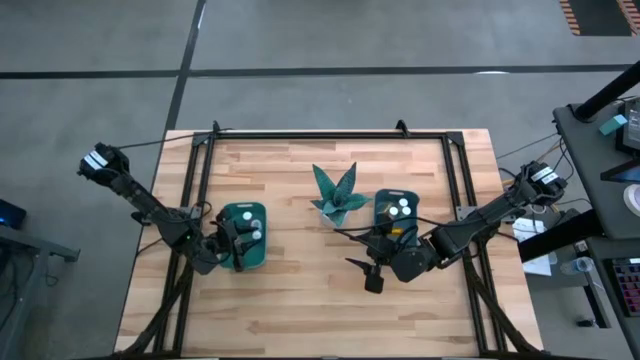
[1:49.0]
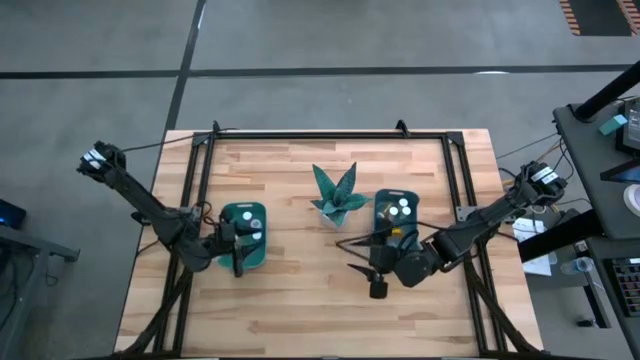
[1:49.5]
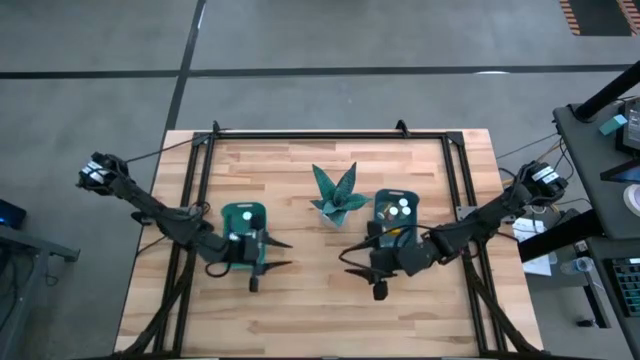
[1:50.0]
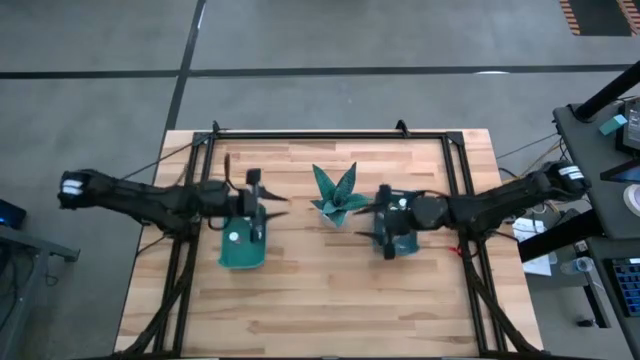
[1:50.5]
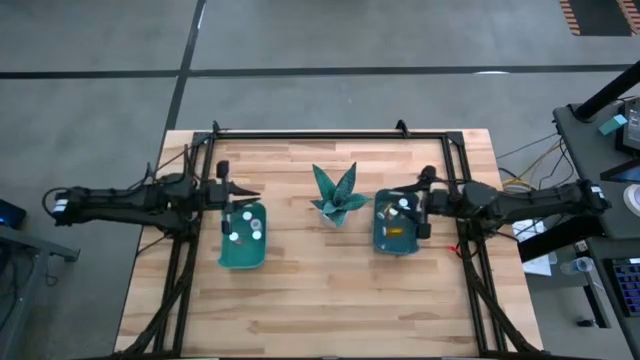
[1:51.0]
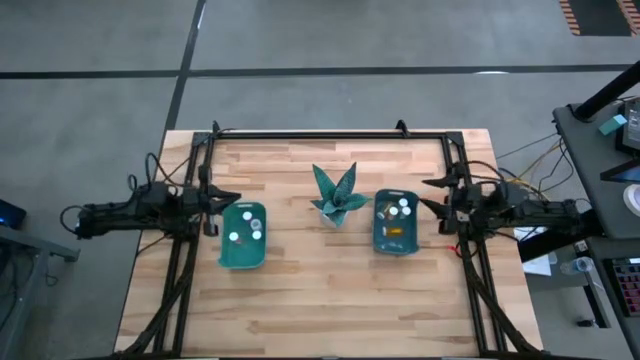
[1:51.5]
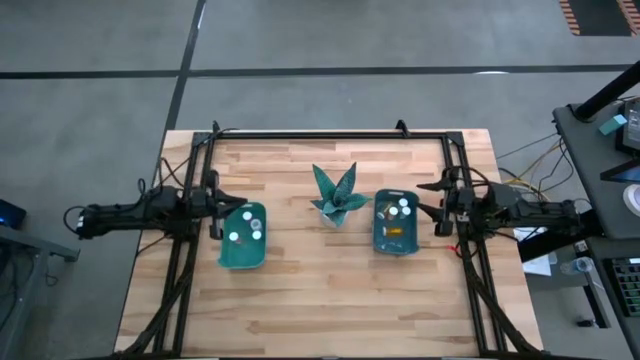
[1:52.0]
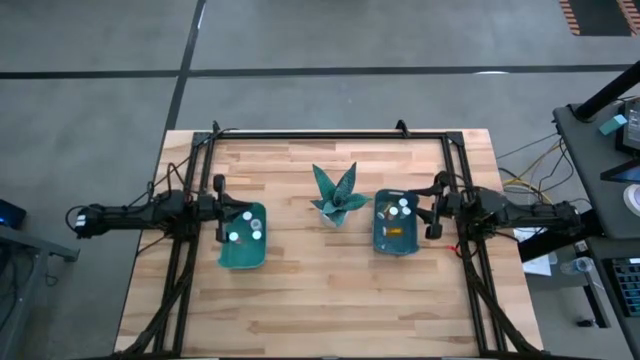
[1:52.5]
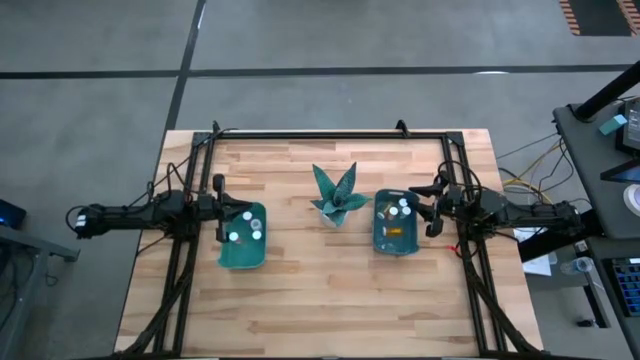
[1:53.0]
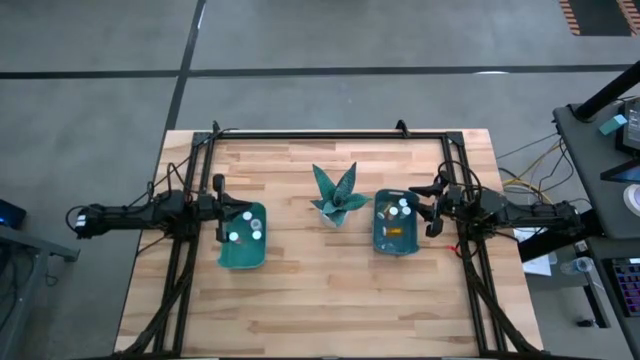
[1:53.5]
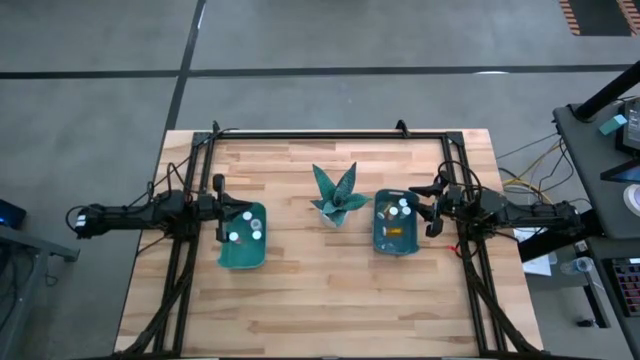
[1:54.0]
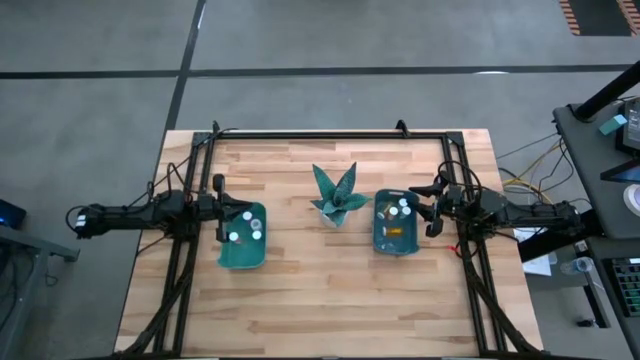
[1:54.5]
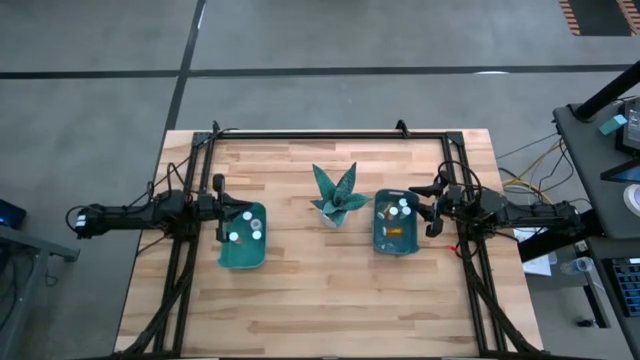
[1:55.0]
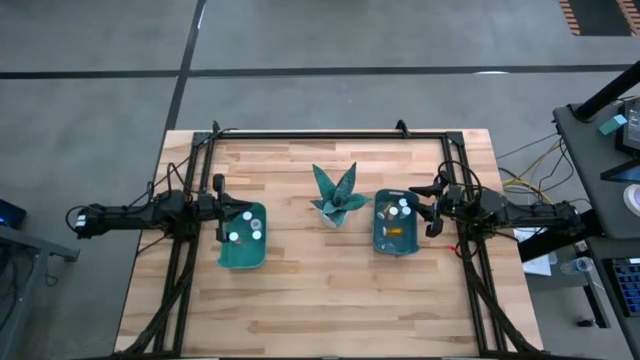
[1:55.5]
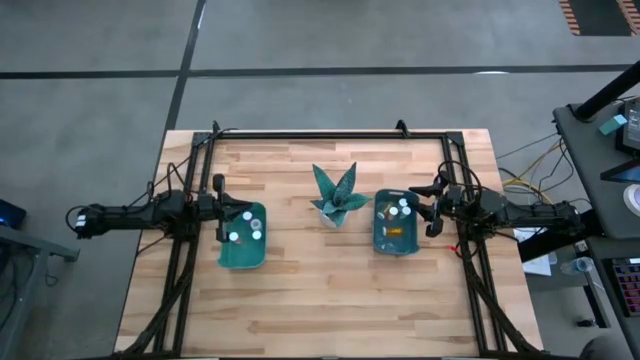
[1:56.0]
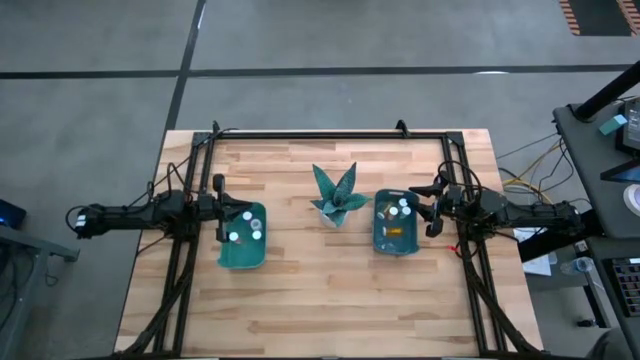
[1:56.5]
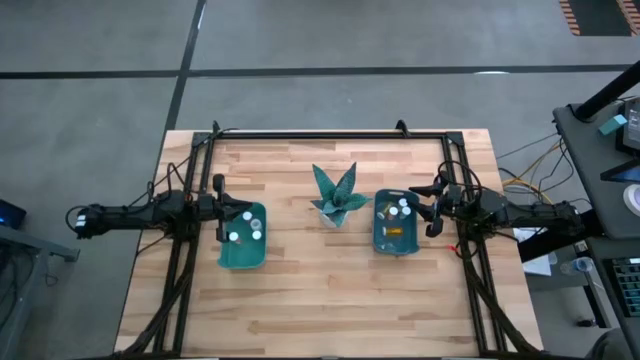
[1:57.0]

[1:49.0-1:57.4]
Task: Pick and place medicine bottles into bin by pill shape (circle, oval)
Return to Home Position

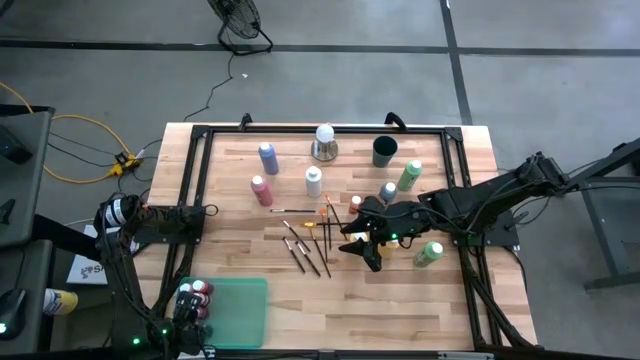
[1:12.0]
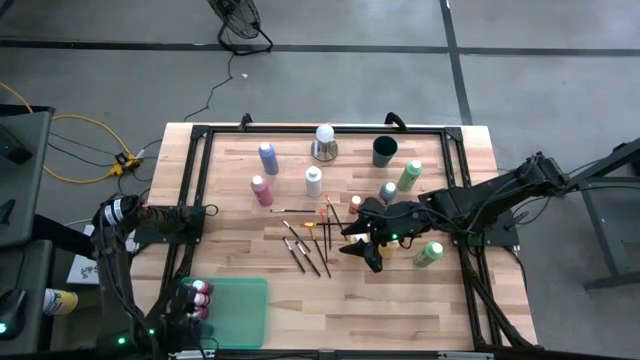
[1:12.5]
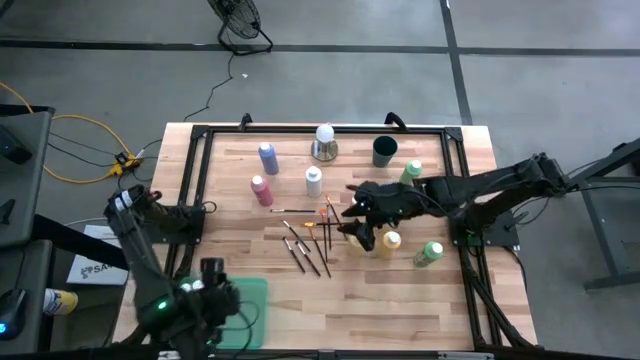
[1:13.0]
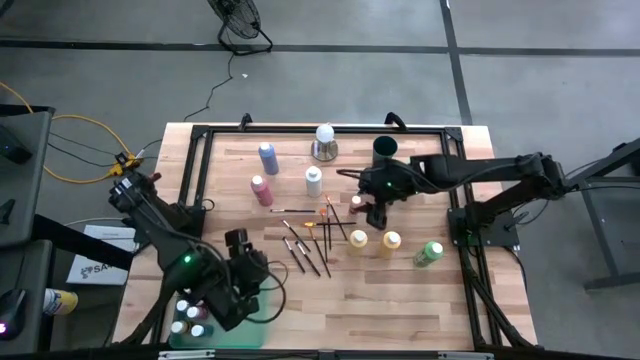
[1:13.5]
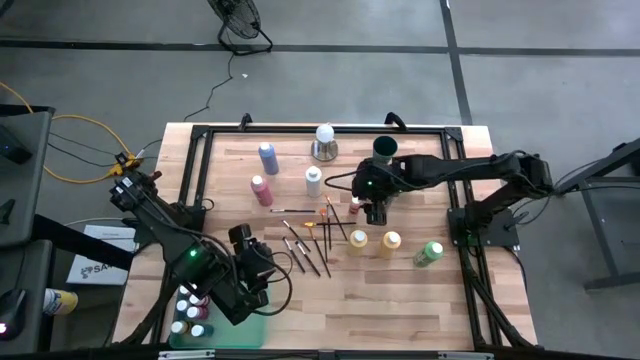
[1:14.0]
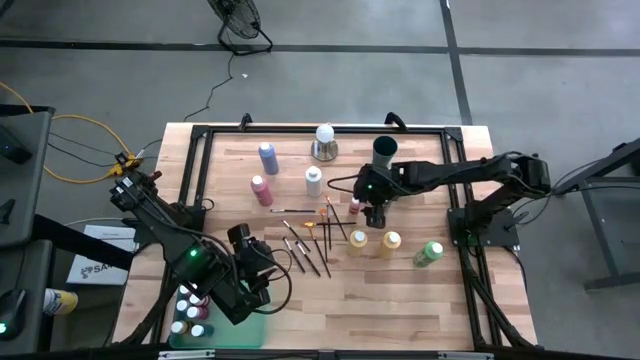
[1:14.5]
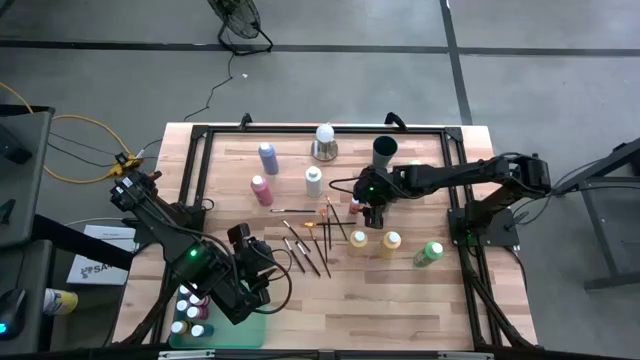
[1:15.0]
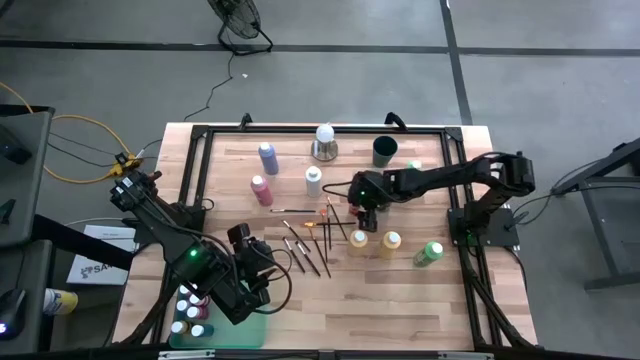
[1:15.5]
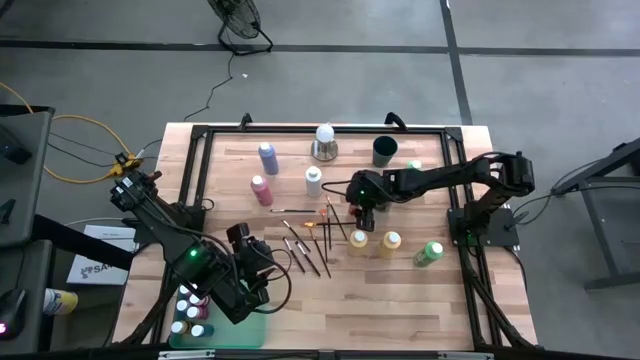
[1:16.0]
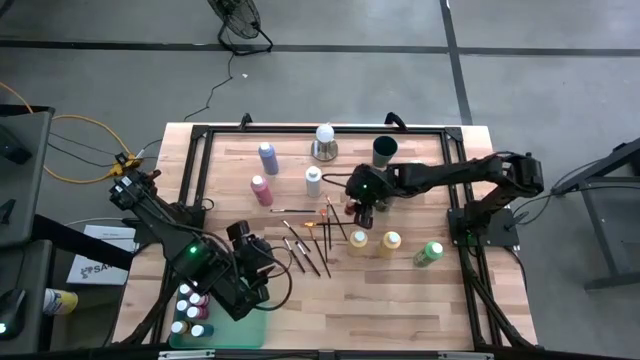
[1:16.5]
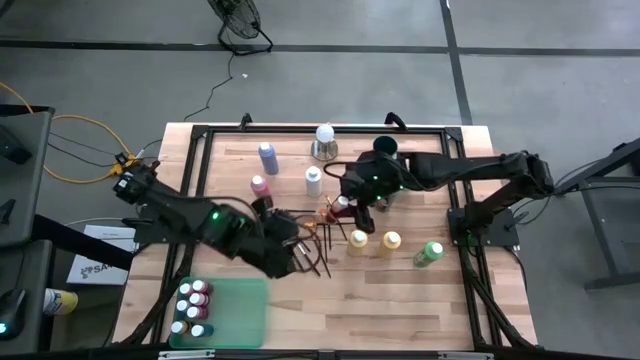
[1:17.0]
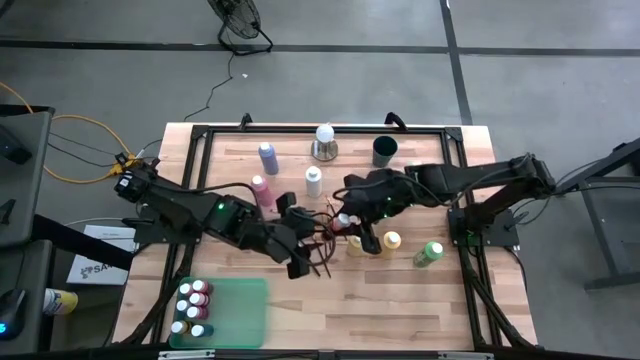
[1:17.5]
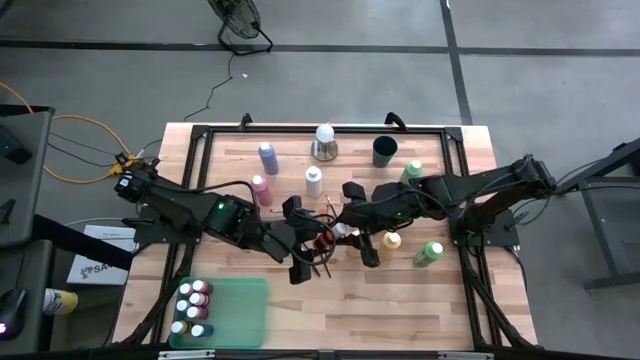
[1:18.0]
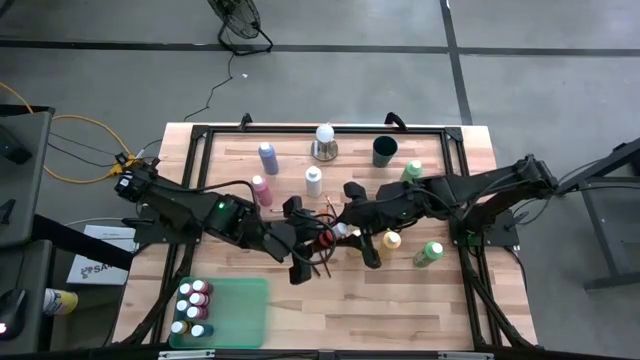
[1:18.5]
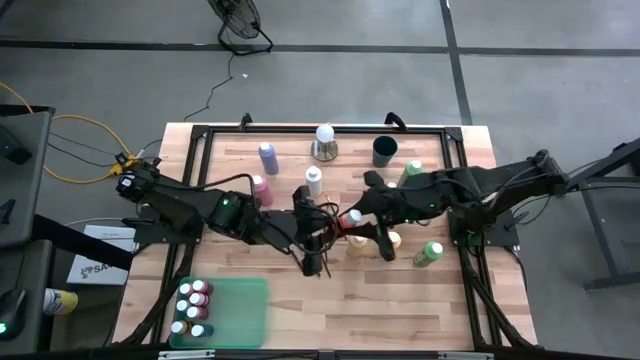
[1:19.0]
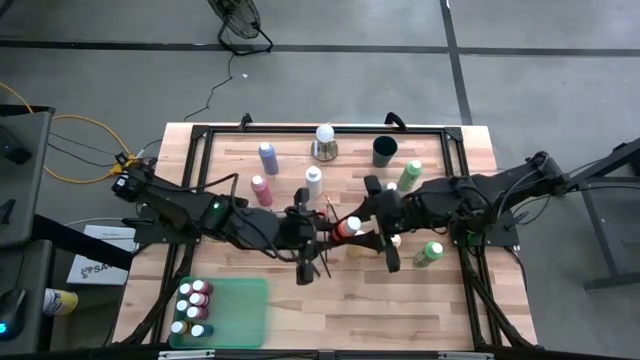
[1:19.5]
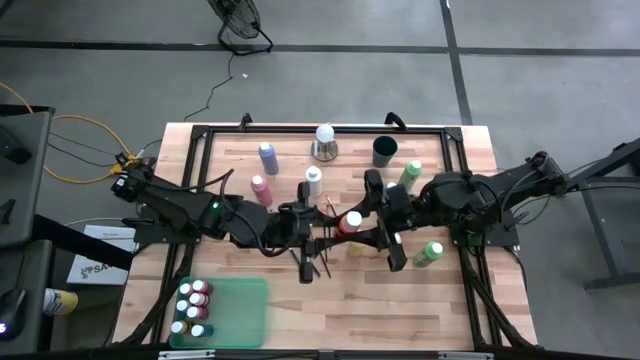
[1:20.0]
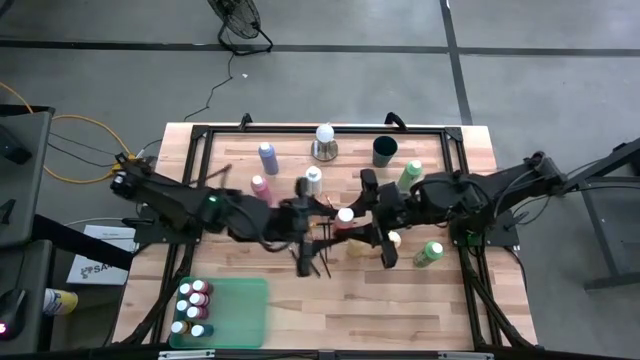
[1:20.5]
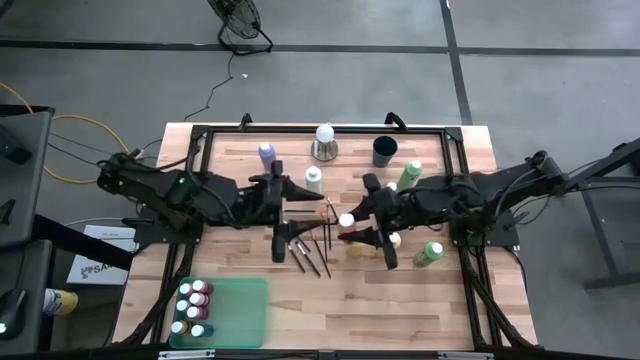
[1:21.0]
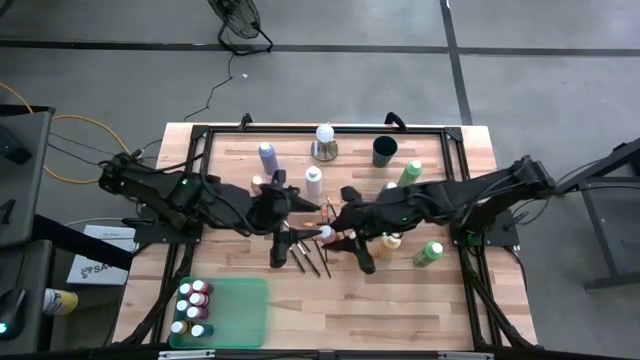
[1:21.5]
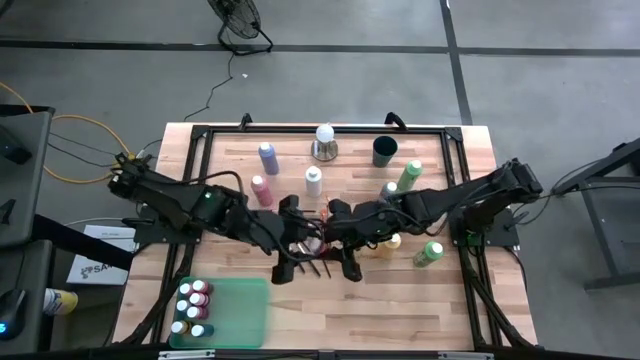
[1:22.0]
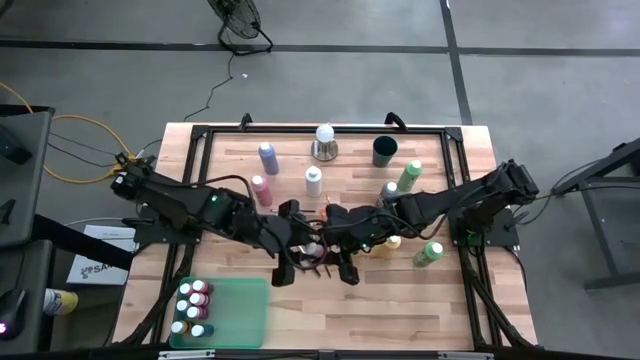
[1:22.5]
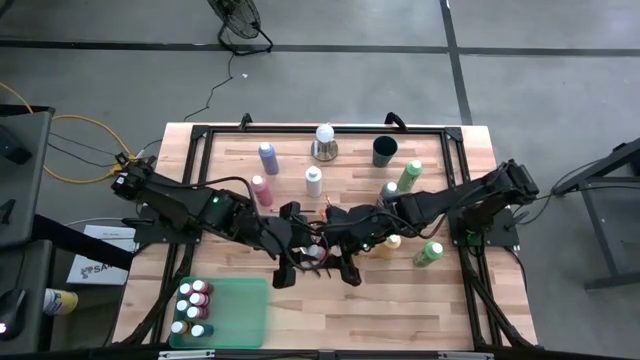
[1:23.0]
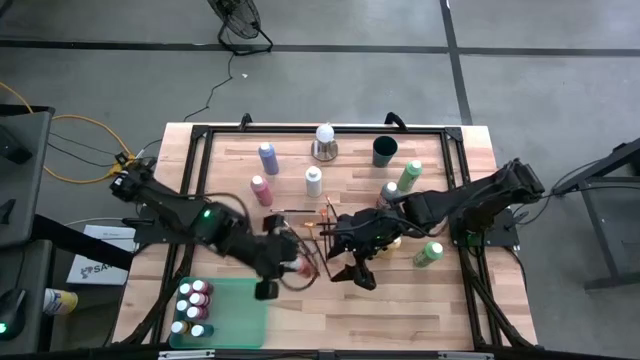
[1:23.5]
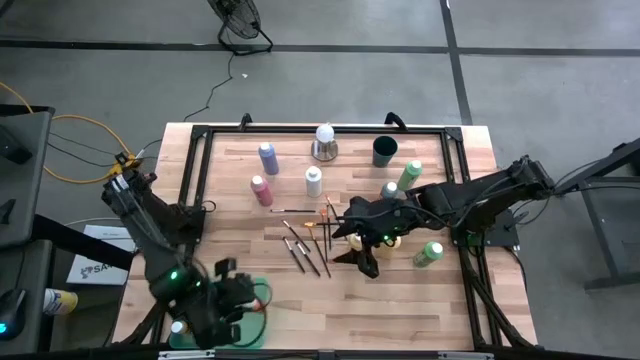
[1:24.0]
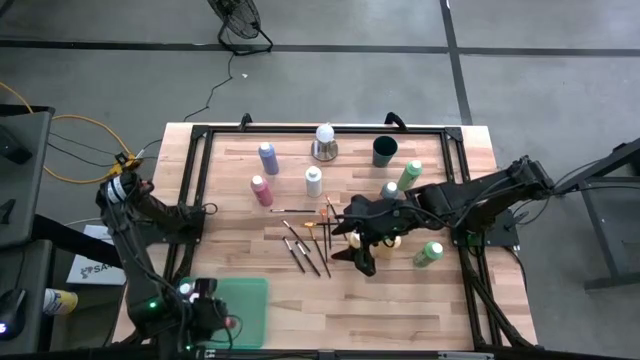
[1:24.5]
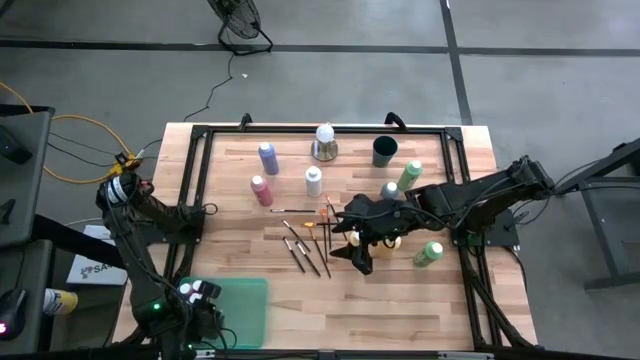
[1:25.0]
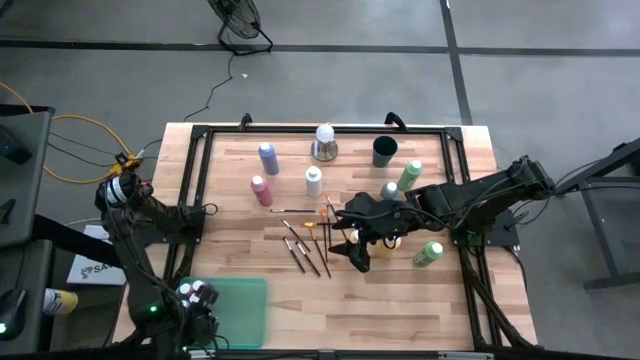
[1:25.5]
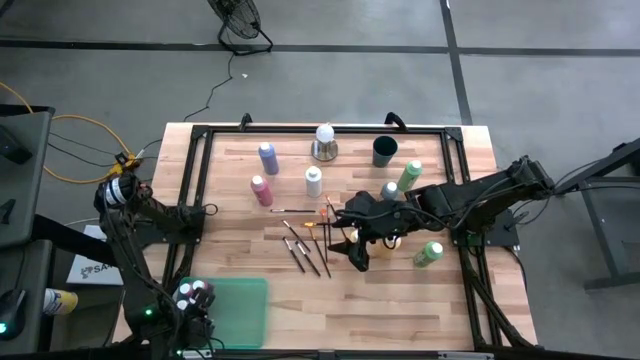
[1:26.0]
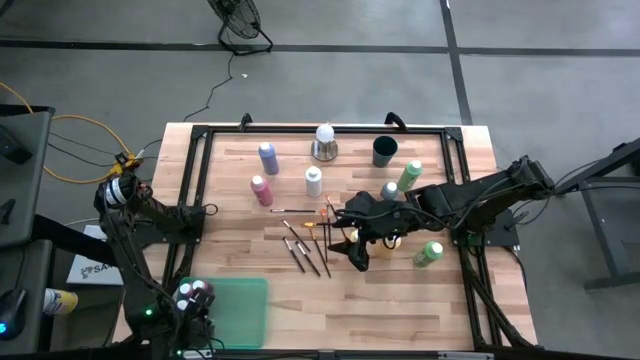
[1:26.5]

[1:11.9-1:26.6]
Task: Pick & Place Paint Supplies
Put the orange paint bottle into the green bin
